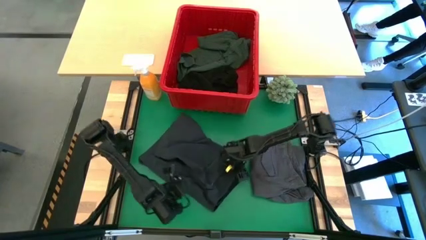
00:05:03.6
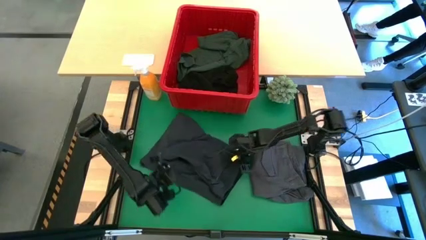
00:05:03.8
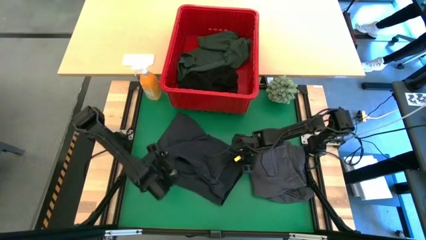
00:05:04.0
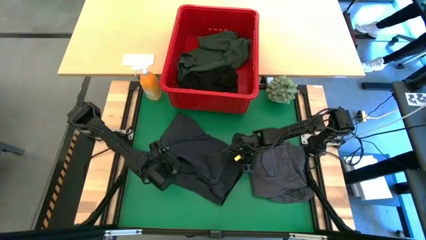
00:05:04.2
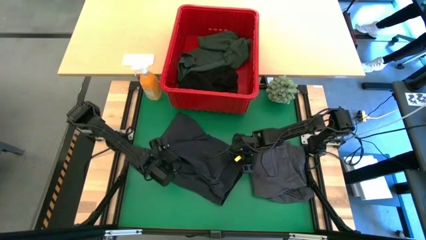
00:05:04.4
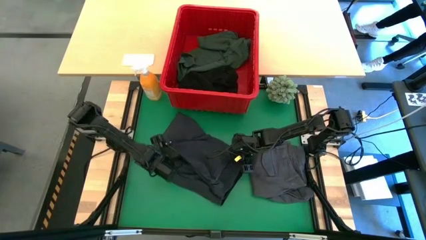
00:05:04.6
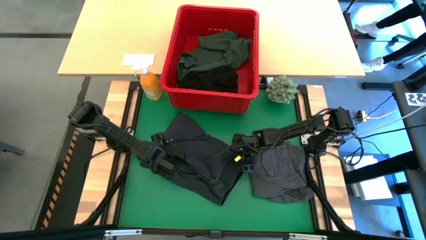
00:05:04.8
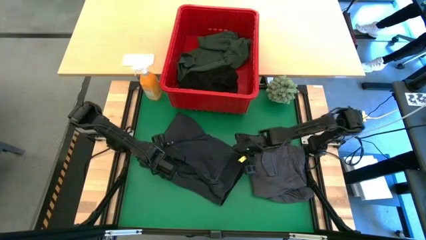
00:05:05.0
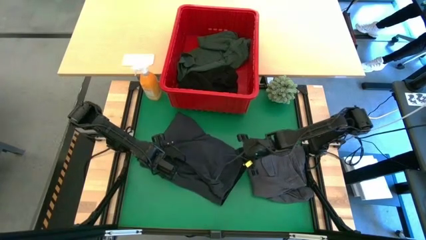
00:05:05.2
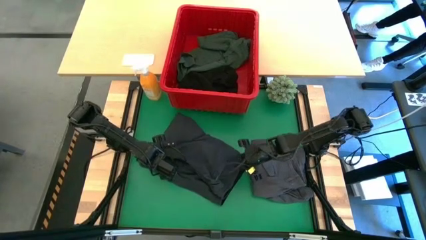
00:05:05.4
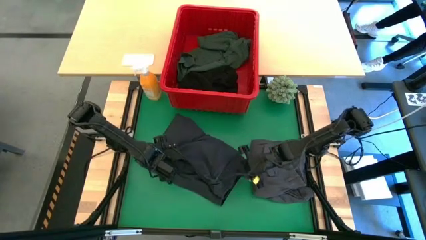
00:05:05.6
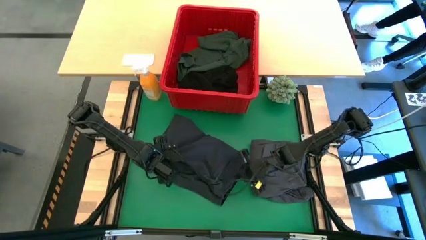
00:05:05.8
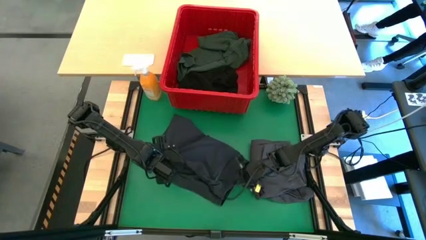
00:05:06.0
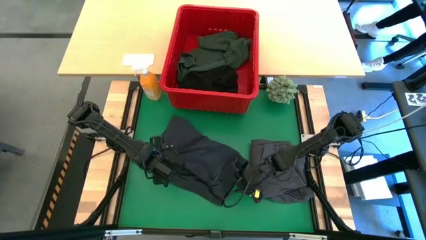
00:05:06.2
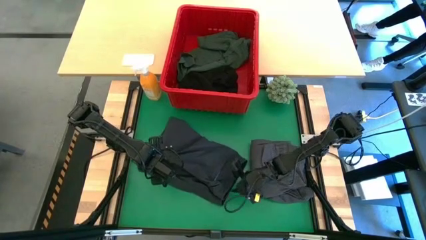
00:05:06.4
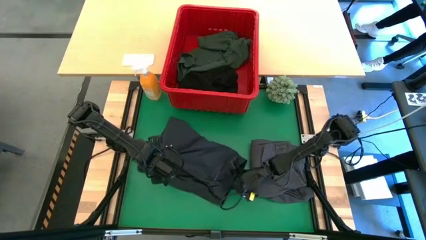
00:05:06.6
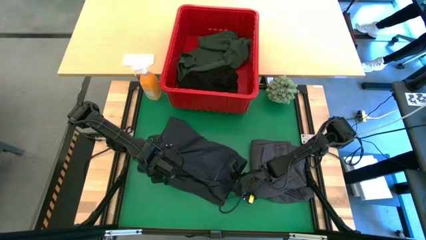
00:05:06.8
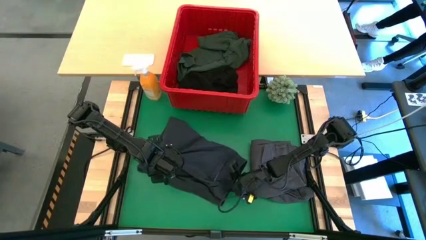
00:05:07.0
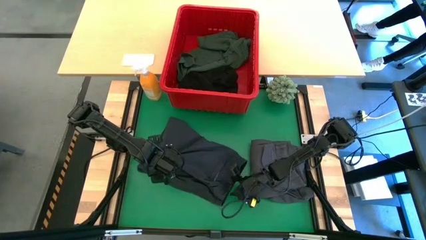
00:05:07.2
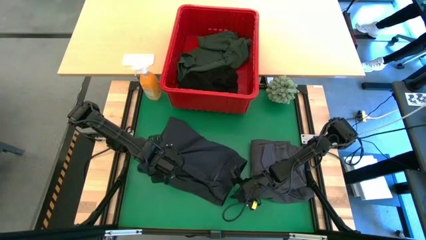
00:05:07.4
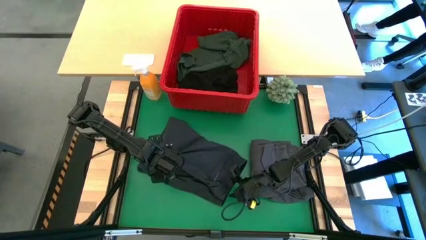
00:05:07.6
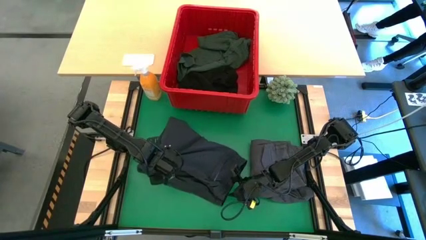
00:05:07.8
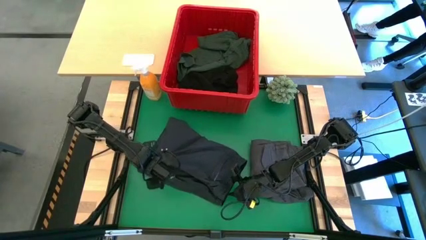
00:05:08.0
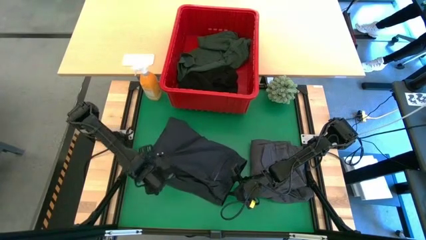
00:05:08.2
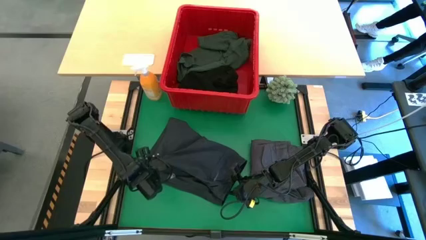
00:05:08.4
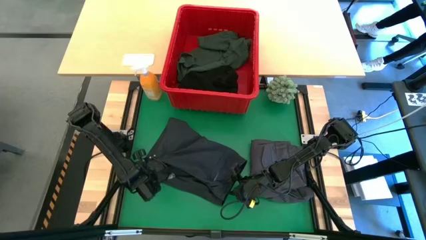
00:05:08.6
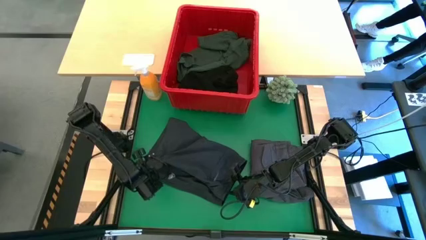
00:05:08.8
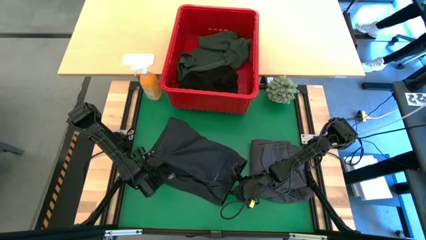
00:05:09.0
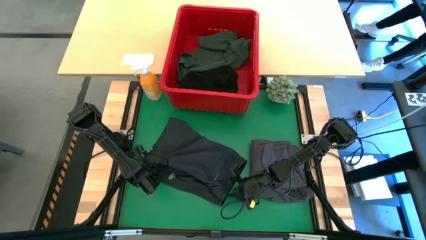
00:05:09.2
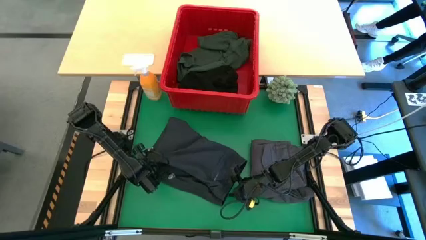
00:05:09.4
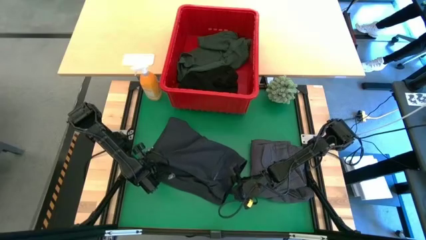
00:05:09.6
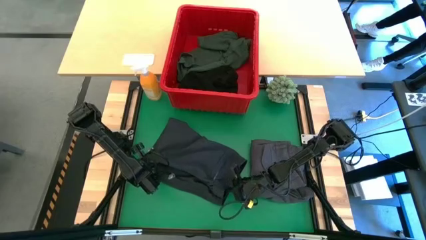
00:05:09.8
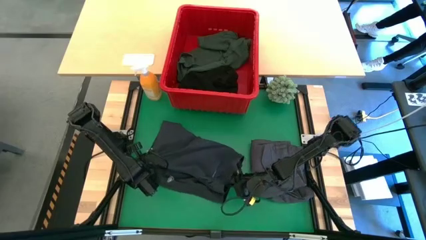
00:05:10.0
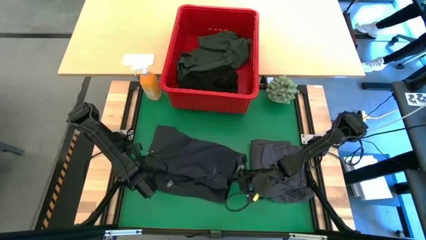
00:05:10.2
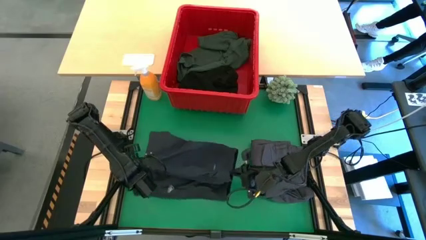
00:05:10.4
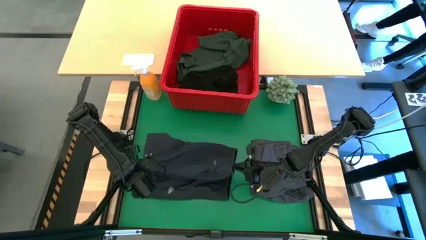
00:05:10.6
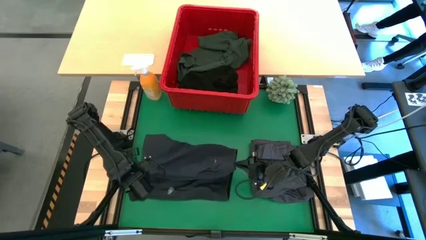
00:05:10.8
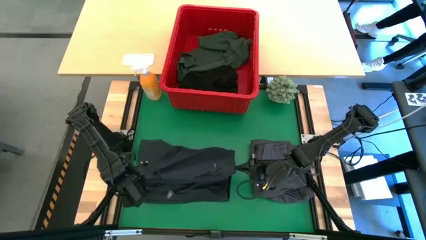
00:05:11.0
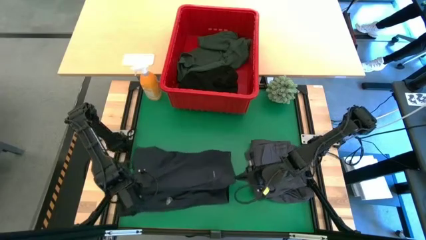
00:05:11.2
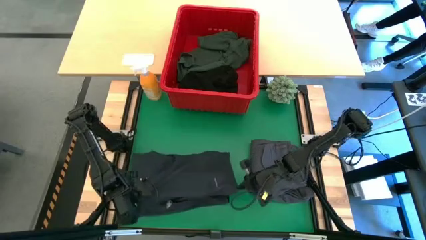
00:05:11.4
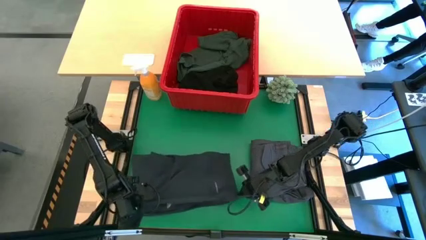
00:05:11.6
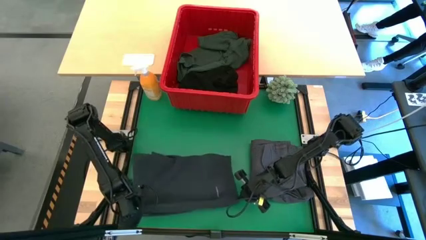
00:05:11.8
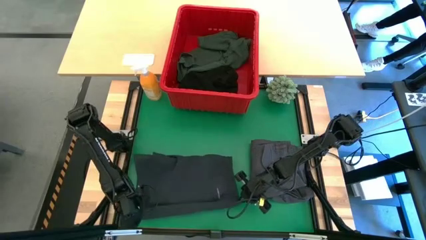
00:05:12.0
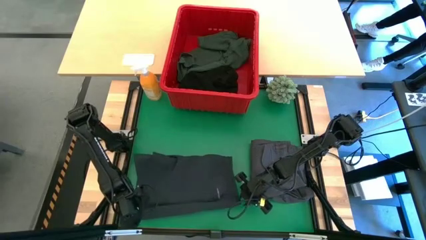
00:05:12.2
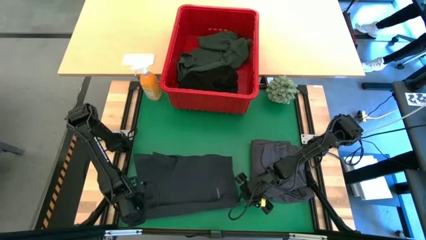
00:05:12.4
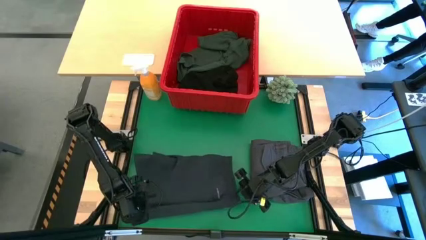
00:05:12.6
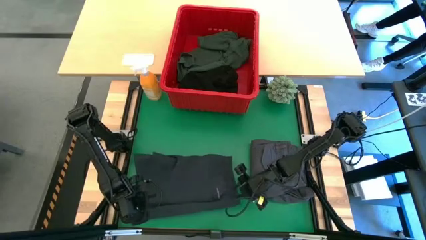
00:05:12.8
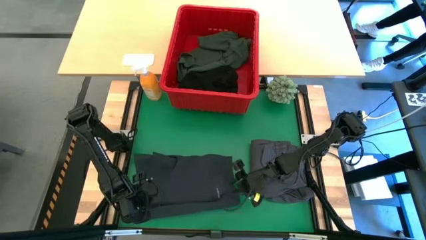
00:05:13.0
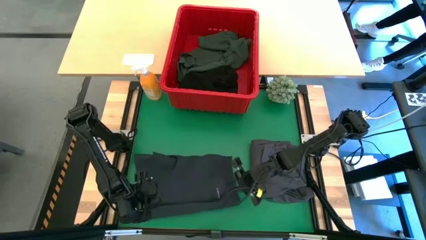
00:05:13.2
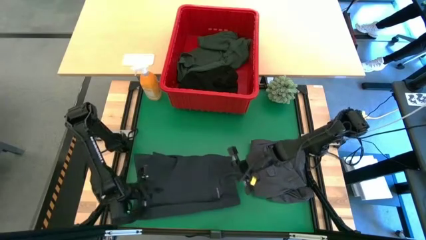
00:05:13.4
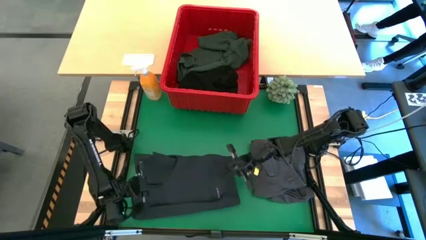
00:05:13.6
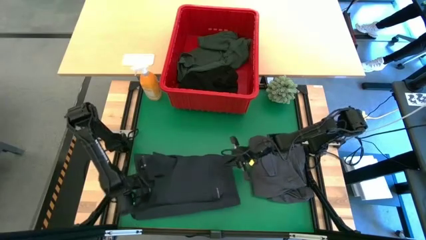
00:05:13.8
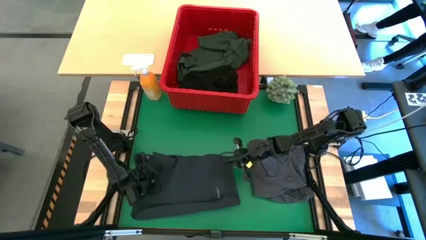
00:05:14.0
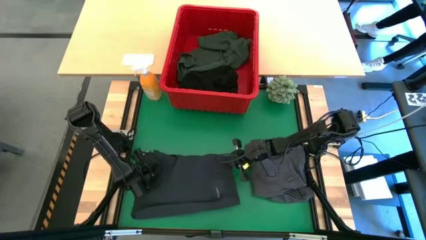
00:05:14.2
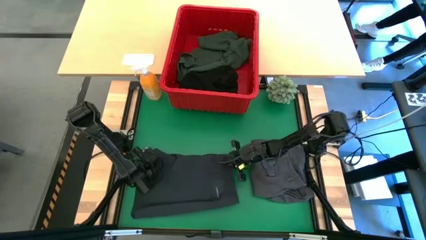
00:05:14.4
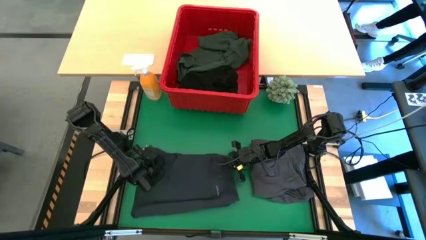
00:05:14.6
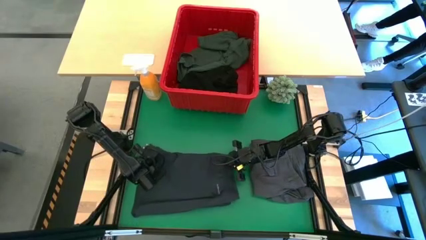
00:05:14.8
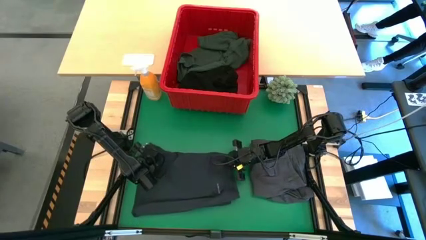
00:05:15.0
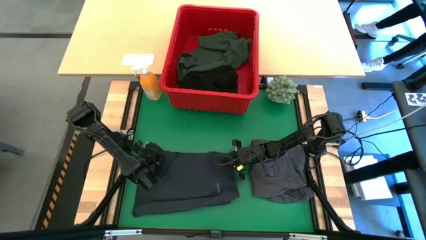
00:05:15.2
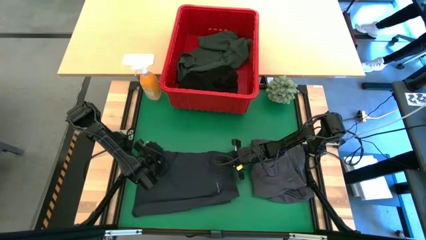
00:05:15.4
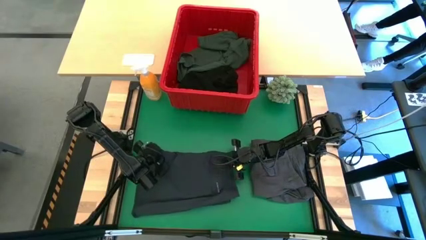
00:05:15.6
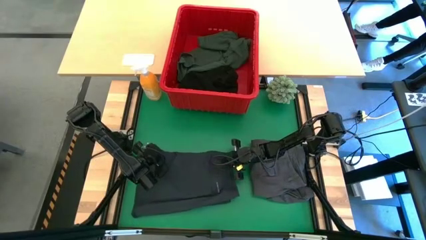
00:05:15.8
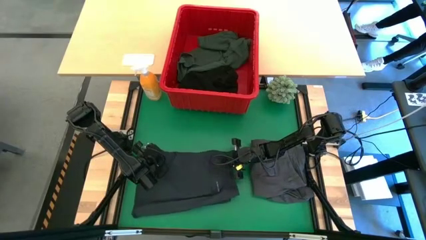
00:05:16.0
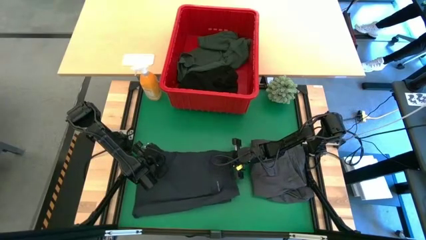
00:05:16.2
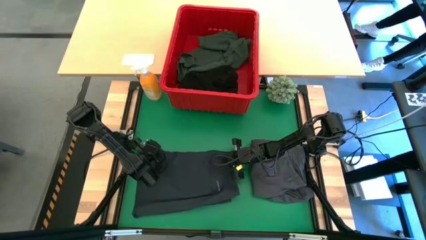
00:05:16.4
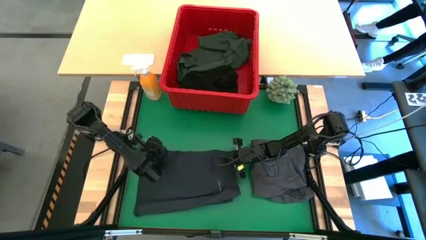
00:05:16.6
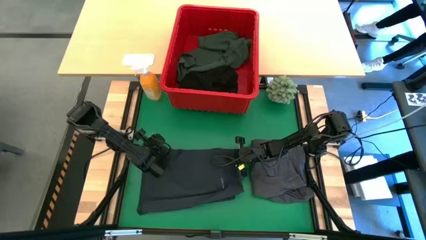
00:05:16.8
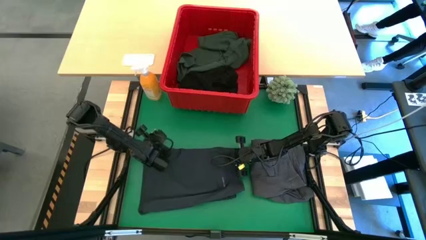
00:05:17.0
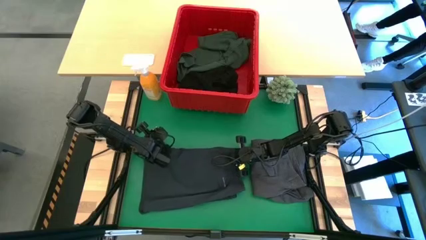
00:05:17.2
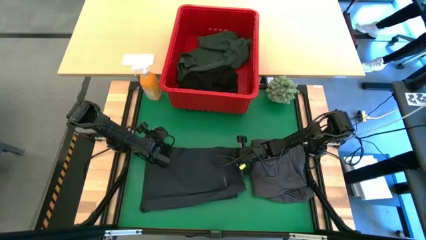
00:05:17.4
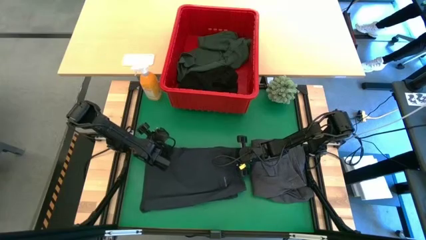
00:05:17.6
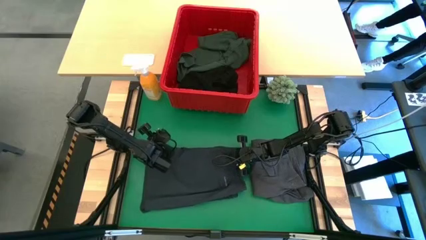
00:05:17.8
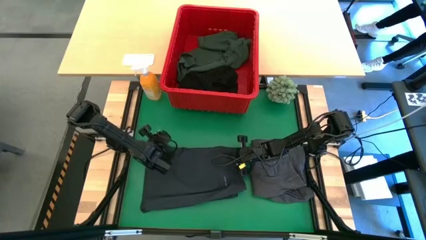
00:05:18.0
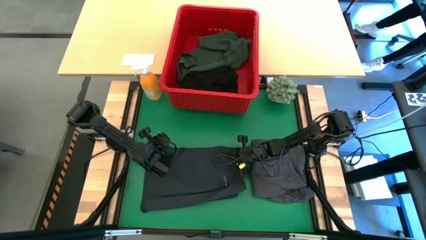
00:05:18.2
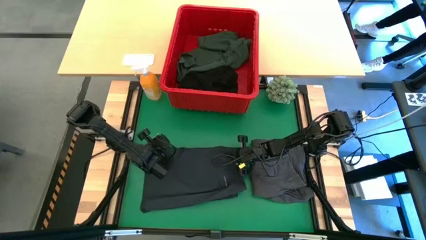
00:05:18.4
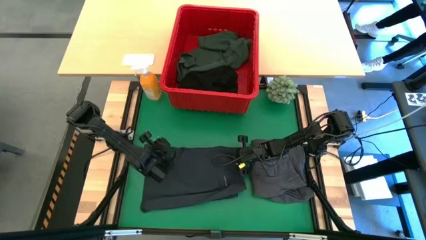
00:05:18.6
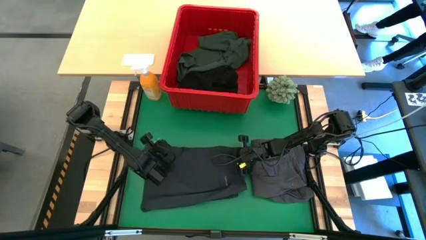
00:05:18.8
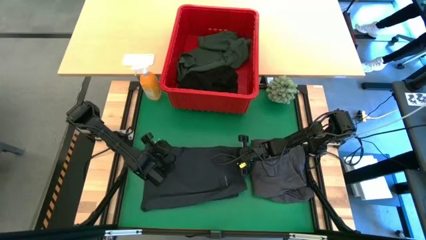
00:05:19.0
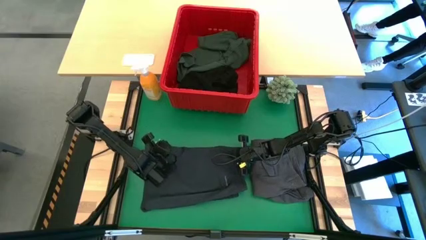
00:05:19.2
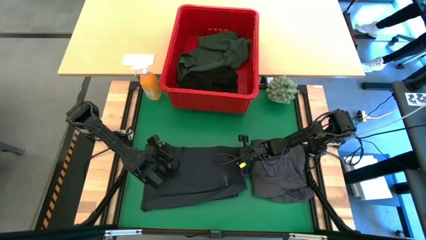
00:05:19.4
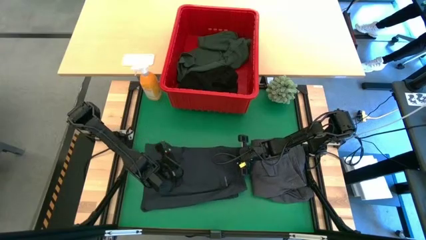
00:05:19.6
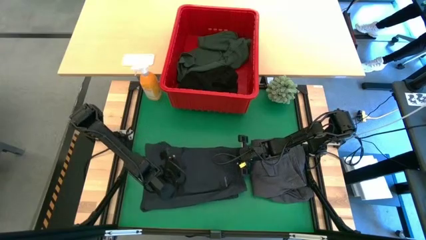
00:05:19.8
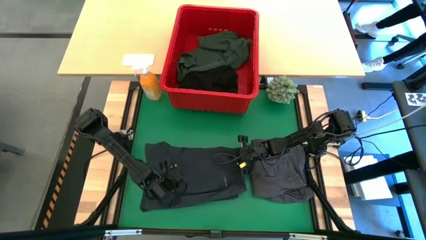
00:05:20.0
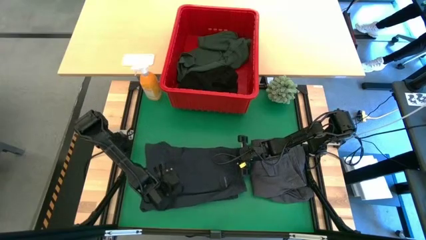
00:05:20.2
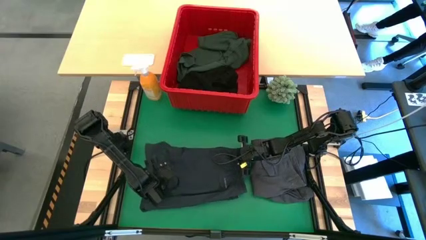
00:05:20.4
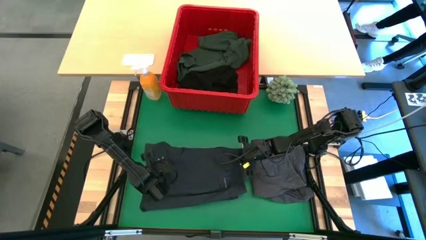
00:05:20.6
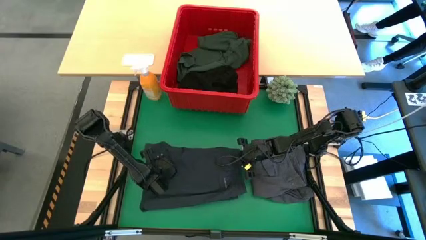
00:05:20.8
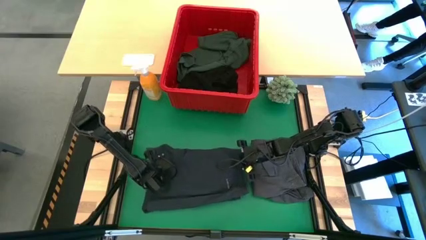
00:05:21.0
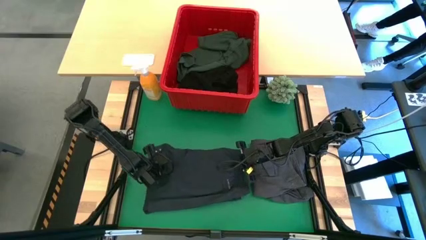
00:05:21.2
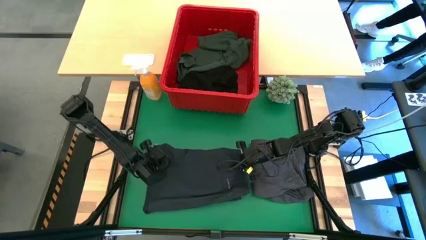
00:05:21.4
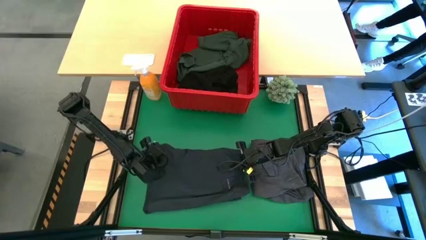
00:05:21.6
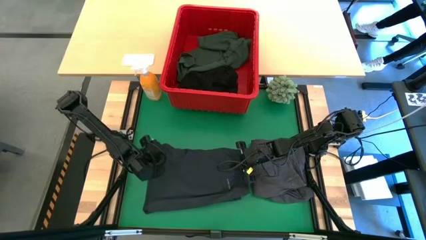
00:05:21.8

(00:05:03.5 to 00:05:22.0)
Task: Fold Laundry from Bin
Fold the dark gray short
